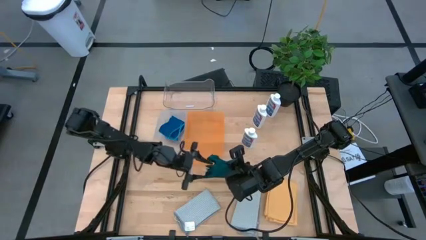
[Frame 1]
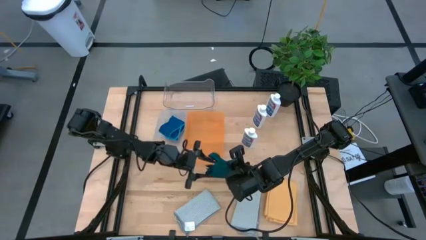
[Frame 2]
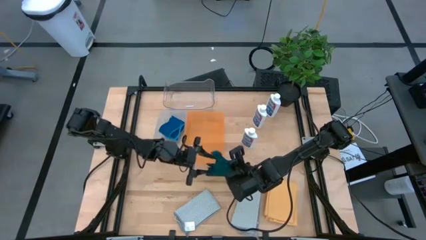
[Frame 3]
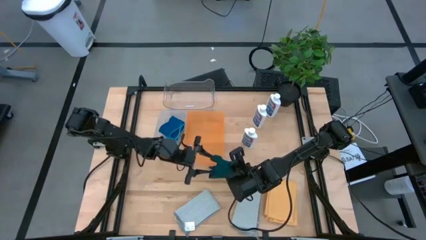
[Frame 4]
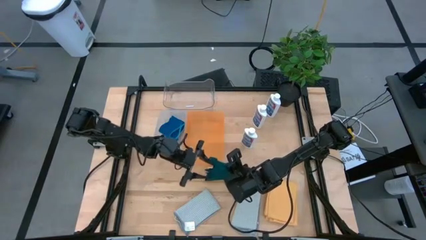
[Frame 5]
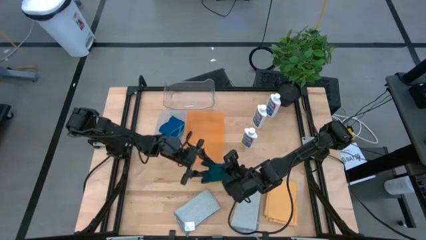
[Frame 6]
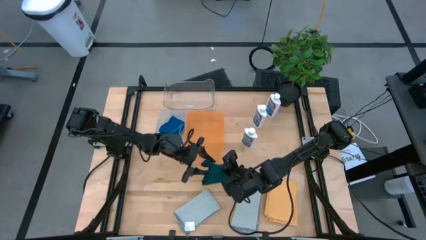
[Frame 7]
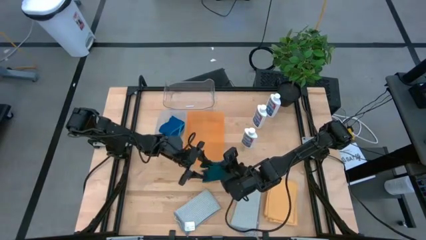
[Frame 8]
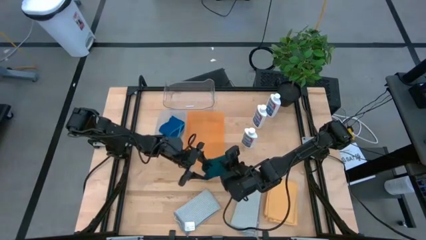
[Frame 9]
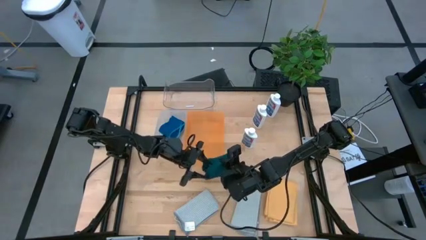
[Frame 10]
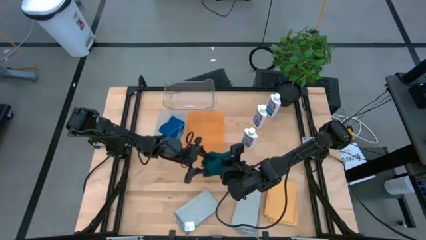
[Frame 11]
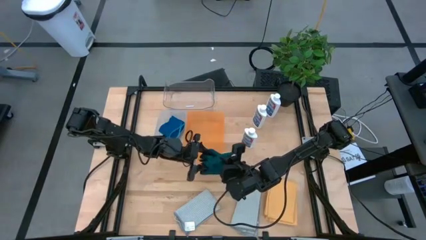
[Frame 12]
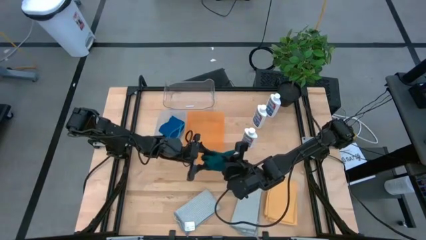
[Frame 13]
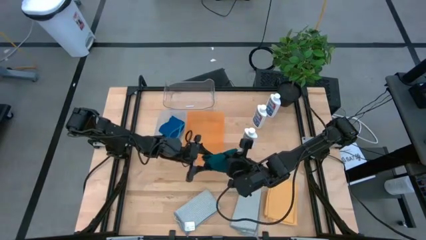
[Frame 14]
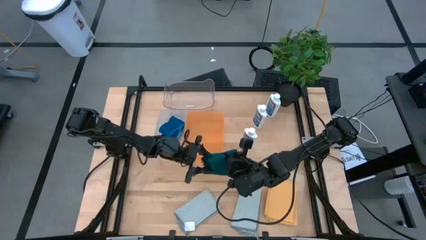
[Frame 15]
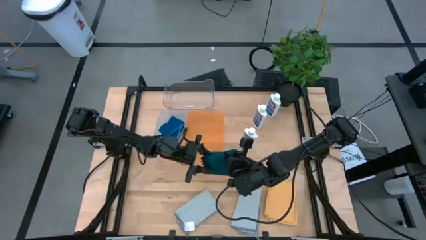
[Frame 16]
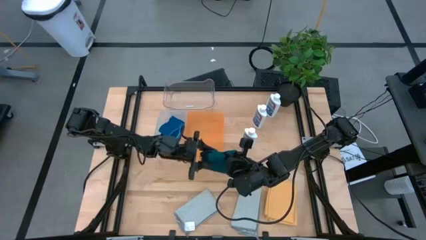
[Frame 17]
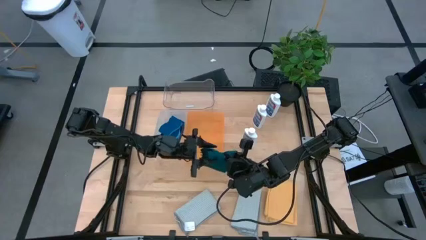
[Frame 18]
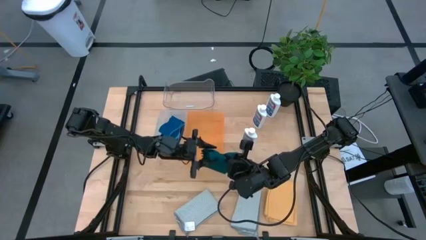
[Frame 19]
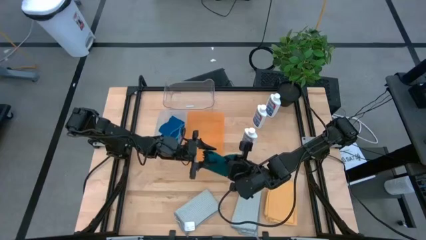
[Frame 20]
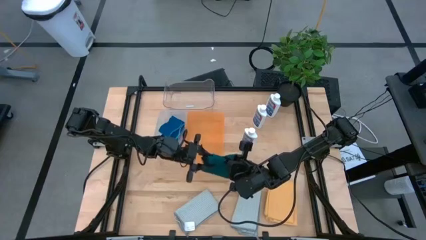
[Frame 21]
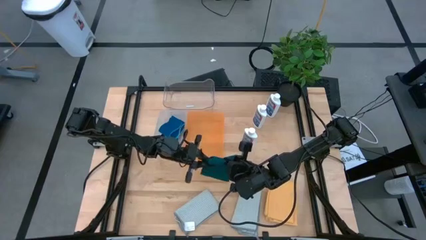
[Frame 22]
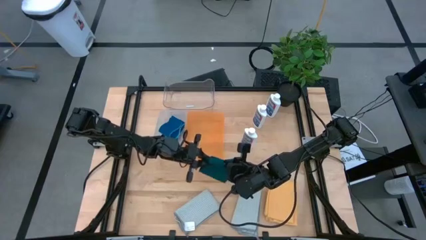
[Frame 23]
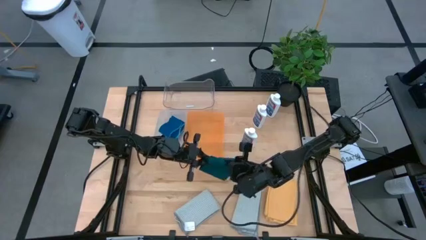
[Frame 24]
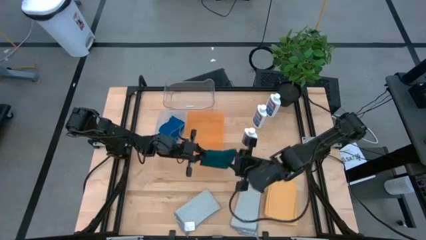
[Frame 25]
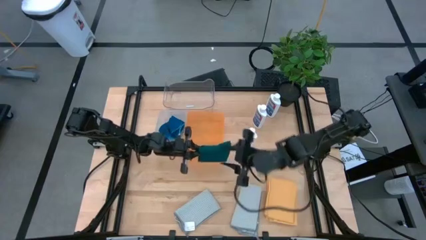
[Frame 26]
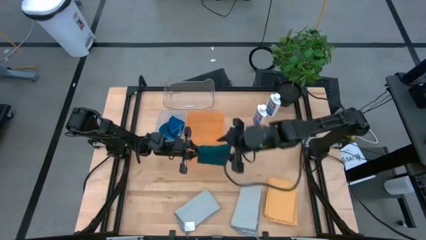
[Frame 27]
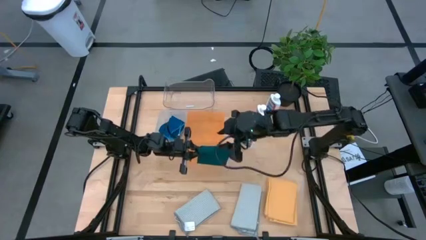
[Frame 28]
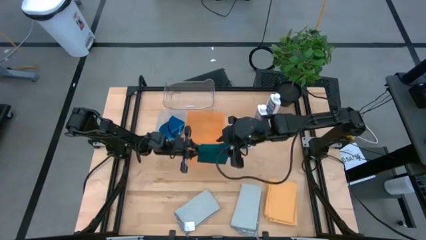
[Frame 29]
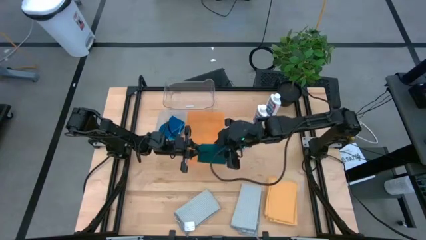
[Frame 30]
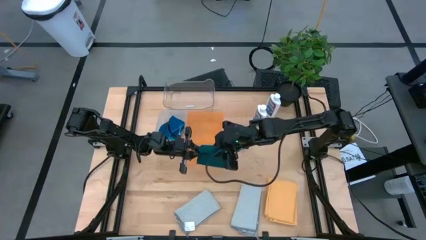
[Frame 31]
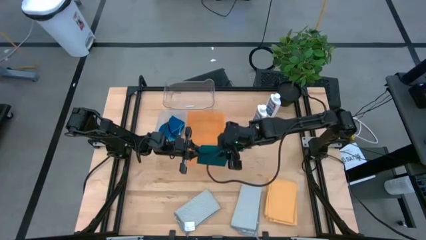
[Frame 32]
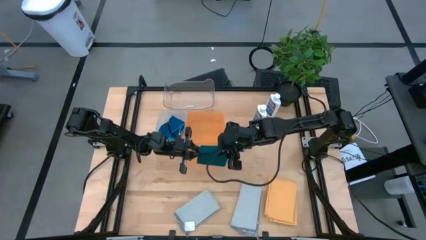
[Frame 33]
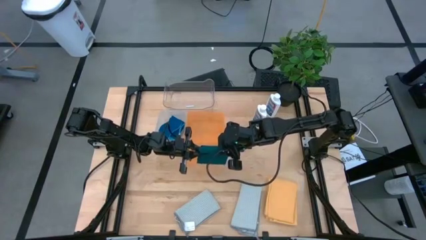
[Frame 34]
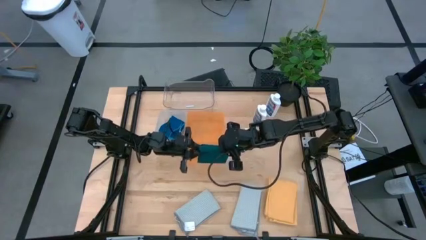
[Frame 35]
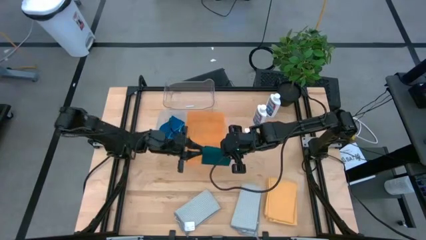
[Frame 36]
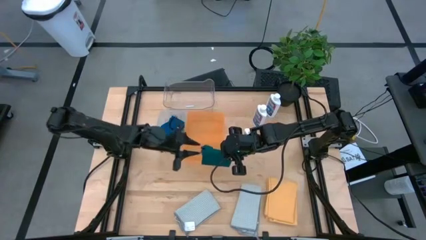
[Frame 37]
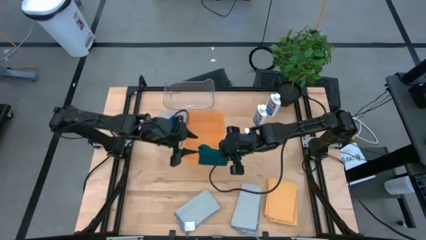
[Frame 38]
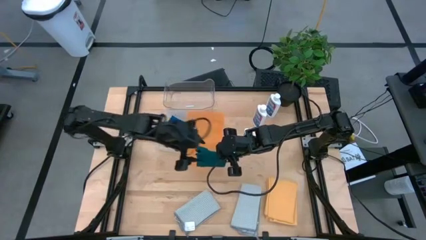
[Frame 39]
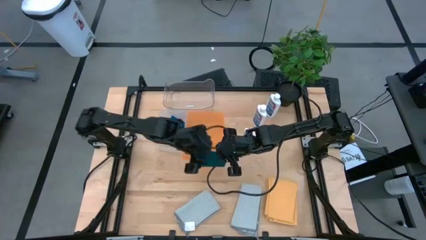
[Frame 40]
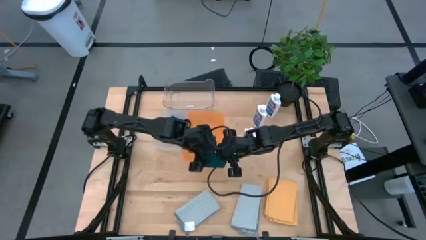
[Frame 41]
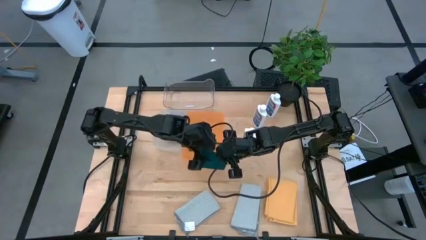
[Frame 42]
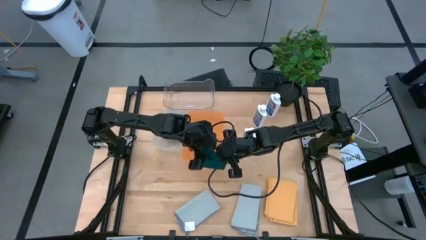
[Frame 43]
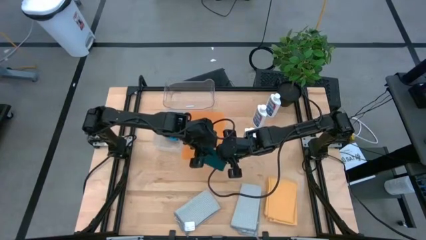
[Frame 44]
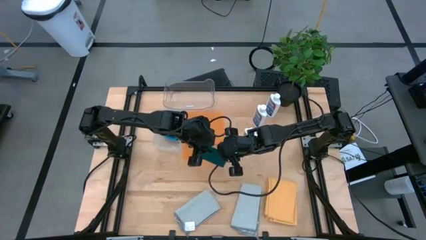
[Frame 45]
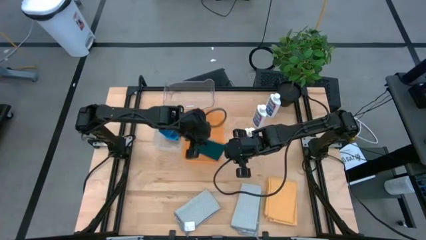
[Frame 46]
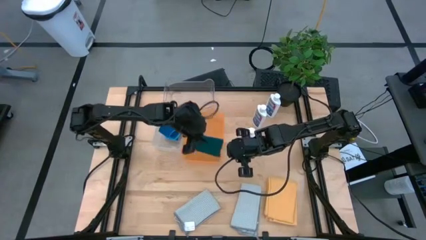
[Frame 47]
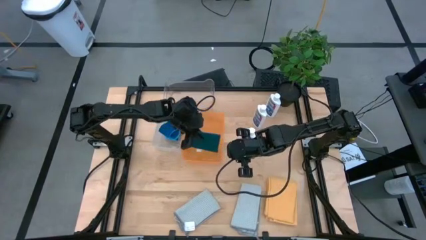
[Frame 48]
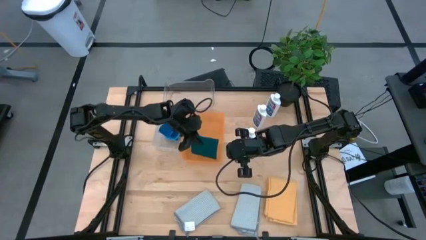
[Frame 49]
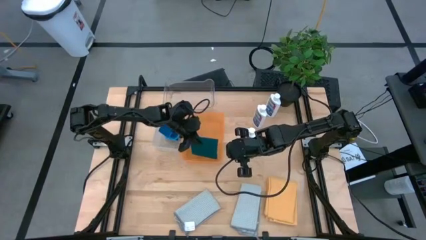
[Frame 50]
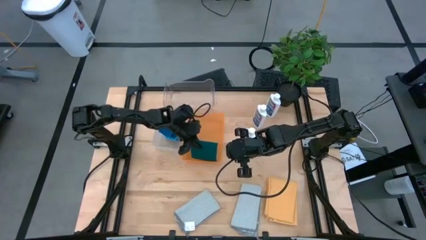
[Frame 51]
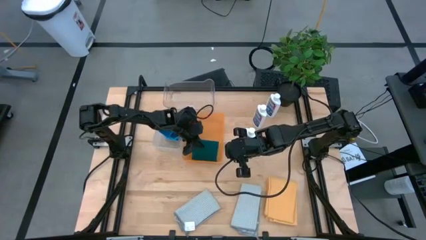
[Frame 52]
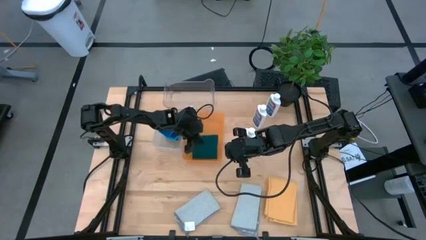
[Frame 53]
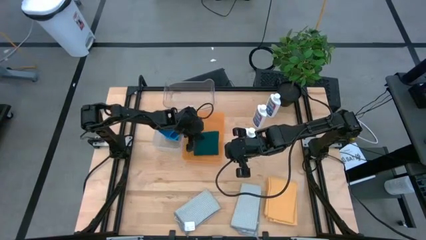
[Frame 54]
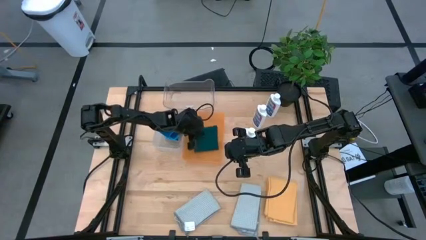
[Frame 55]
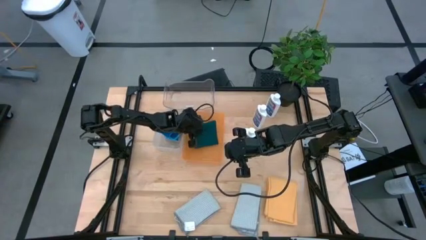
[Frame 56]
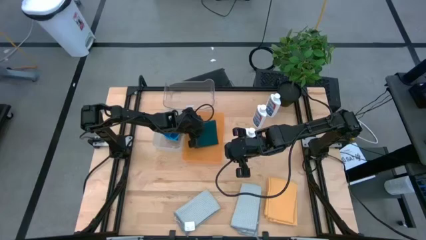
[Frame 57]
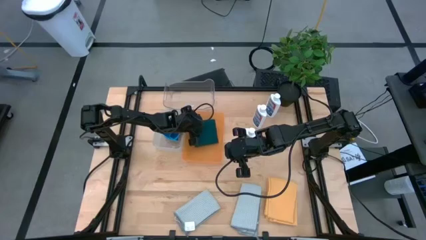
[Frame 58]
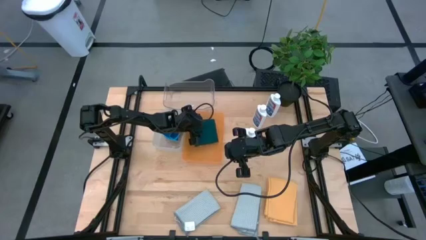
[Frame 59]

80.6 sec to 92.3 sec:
Task: Pick & Place Kitchen Items
Put the green towel into the orange bin
